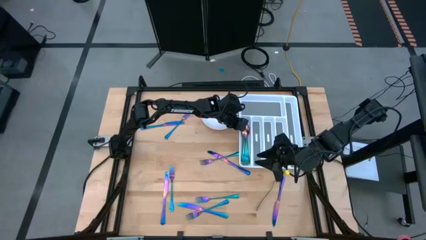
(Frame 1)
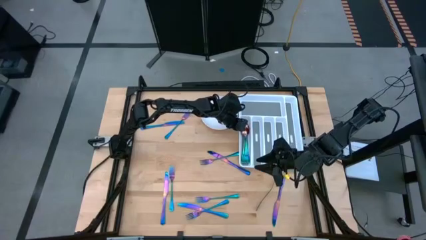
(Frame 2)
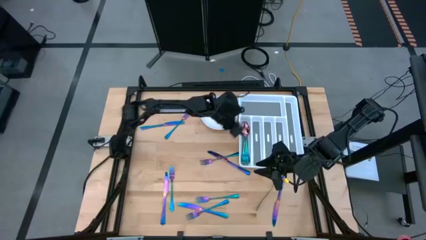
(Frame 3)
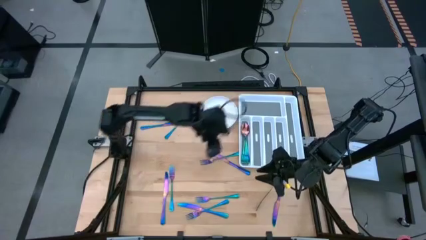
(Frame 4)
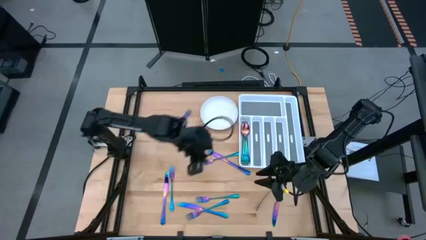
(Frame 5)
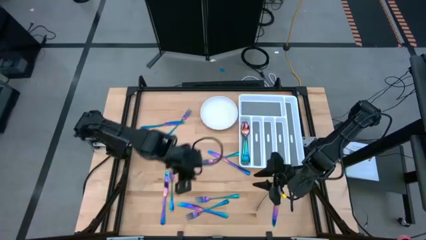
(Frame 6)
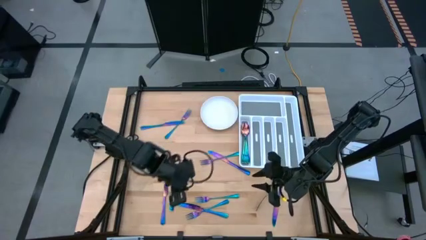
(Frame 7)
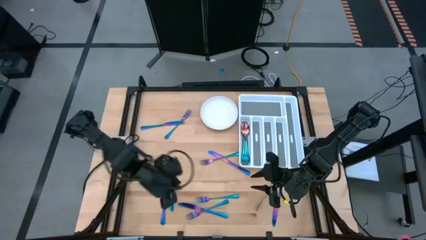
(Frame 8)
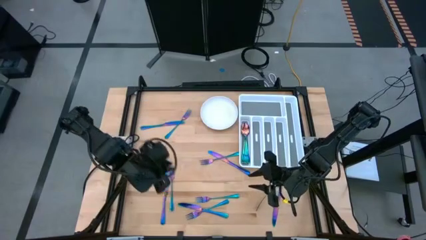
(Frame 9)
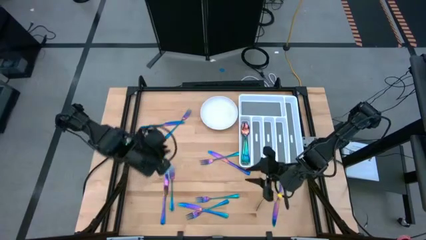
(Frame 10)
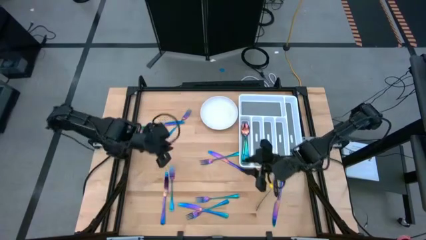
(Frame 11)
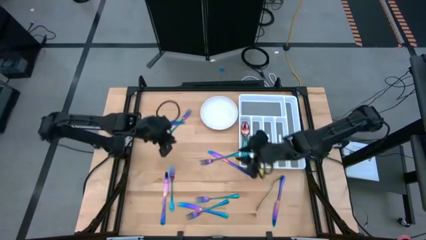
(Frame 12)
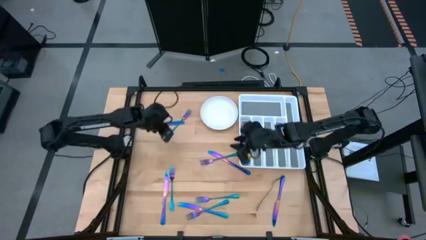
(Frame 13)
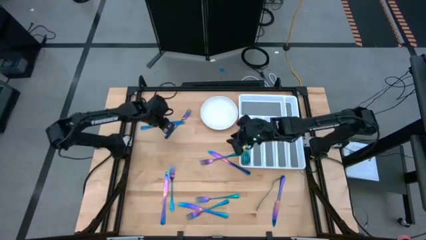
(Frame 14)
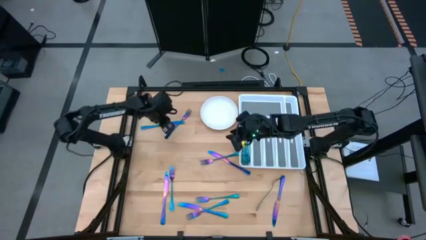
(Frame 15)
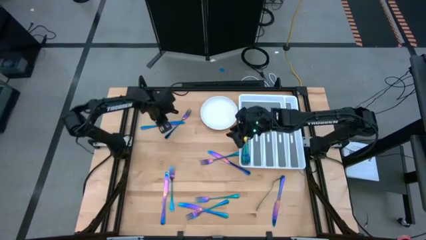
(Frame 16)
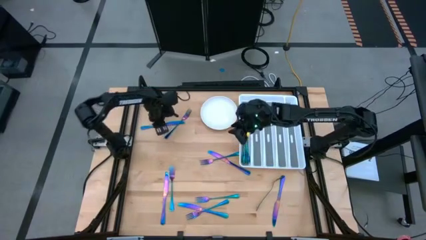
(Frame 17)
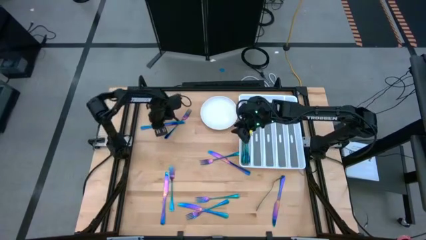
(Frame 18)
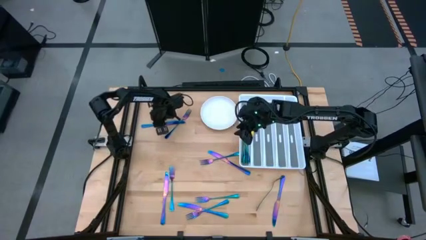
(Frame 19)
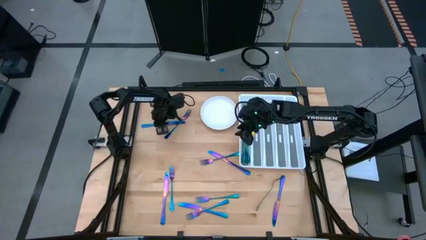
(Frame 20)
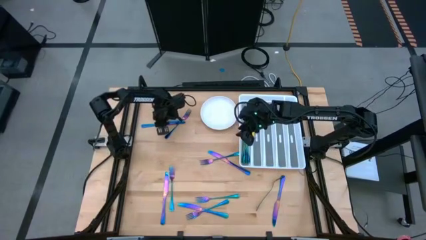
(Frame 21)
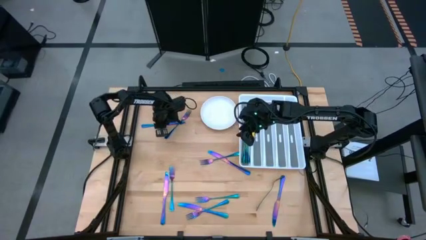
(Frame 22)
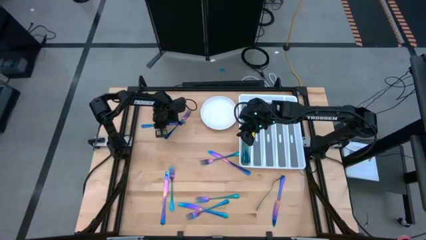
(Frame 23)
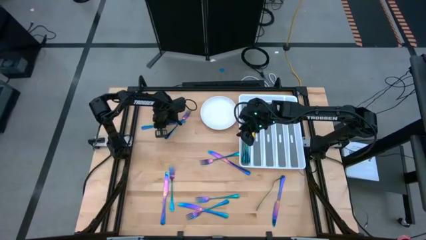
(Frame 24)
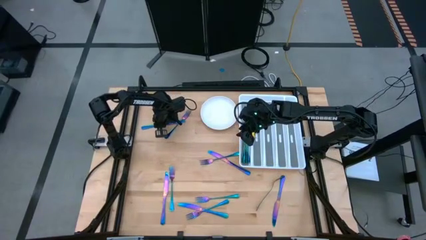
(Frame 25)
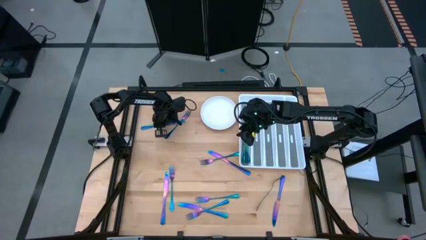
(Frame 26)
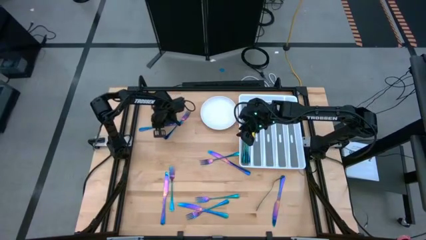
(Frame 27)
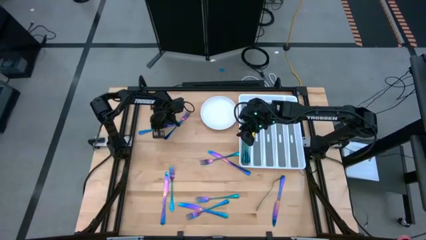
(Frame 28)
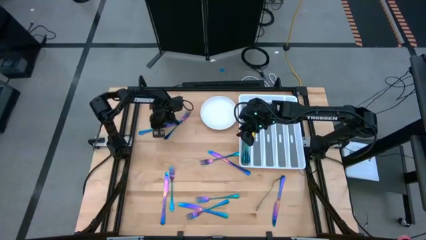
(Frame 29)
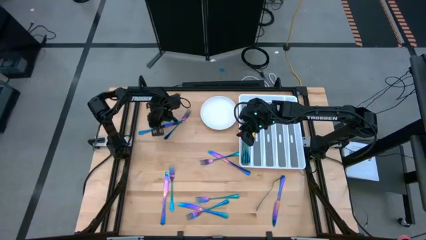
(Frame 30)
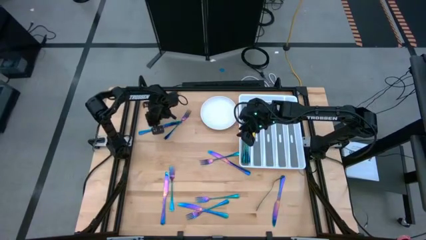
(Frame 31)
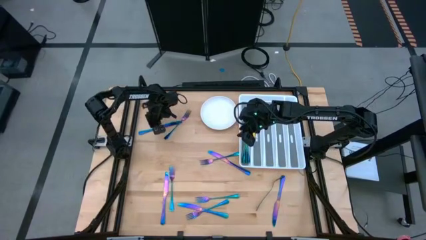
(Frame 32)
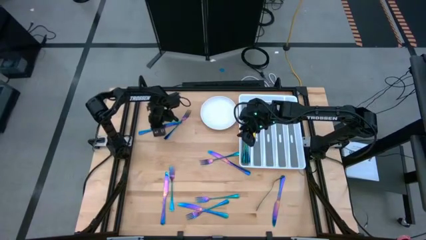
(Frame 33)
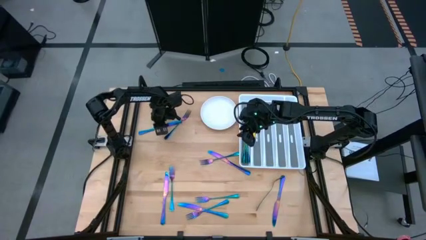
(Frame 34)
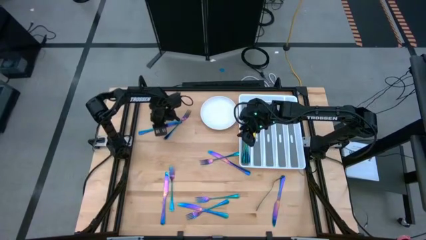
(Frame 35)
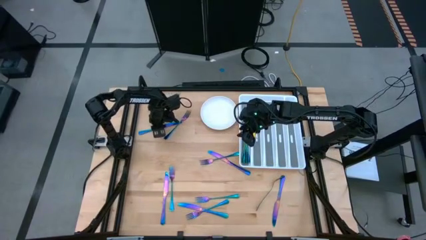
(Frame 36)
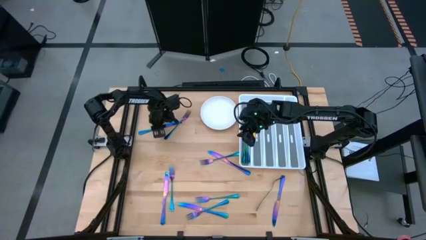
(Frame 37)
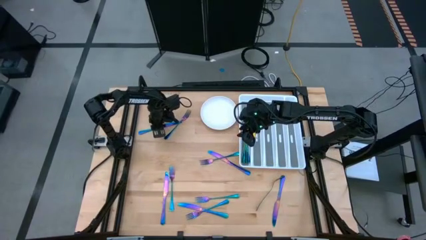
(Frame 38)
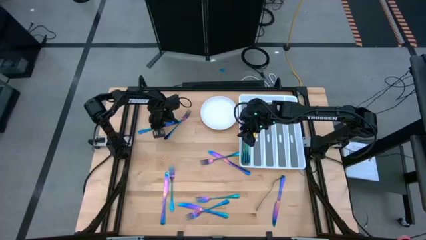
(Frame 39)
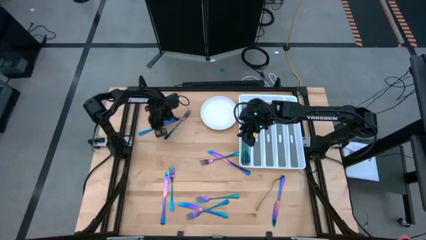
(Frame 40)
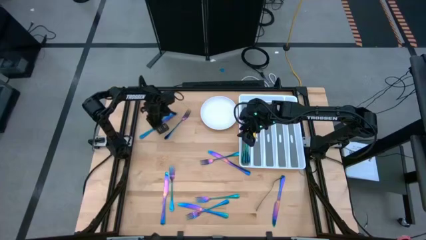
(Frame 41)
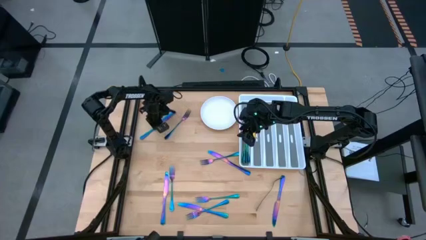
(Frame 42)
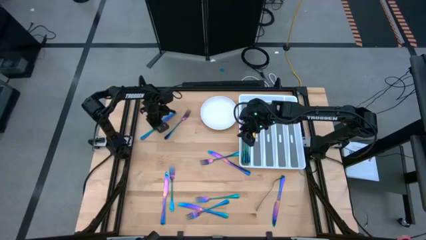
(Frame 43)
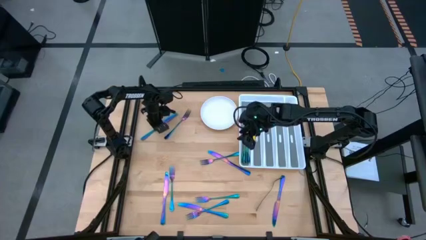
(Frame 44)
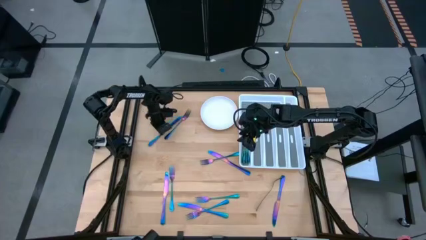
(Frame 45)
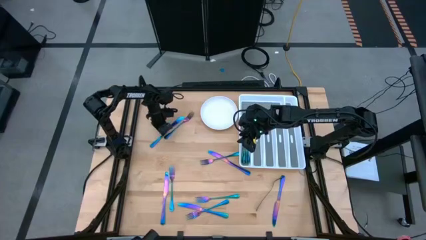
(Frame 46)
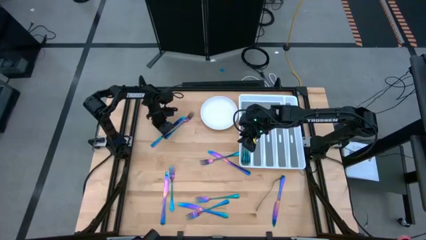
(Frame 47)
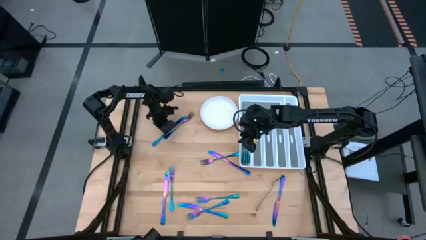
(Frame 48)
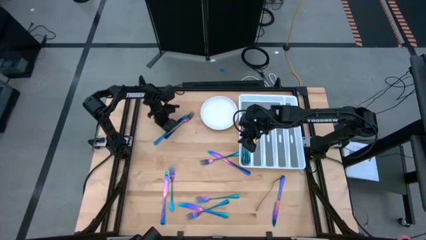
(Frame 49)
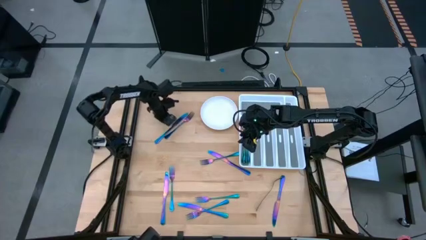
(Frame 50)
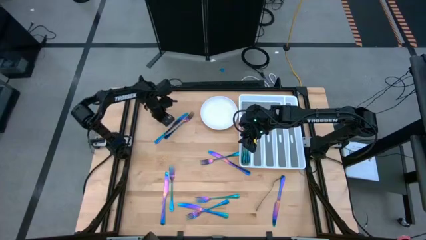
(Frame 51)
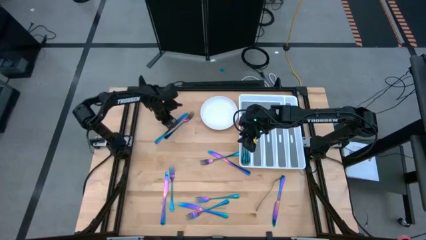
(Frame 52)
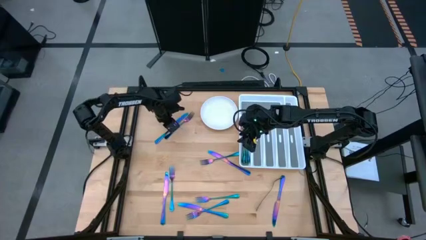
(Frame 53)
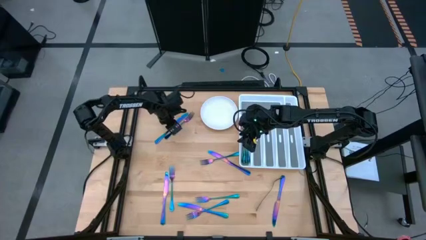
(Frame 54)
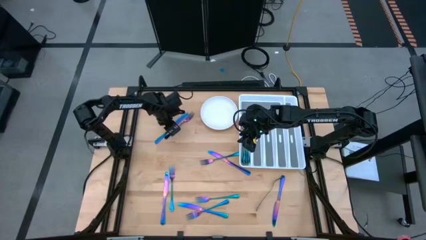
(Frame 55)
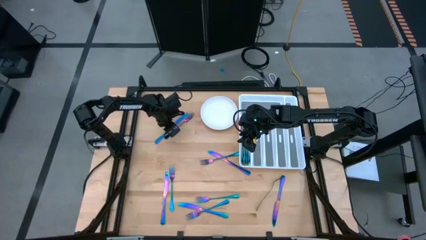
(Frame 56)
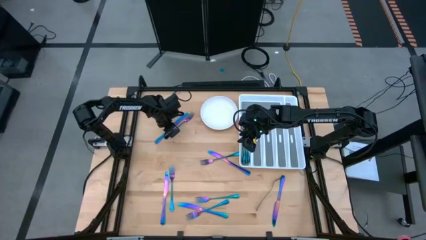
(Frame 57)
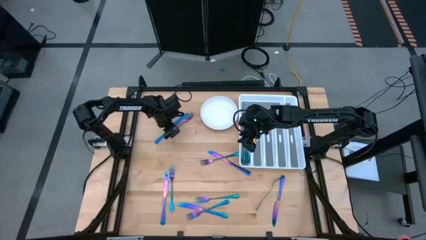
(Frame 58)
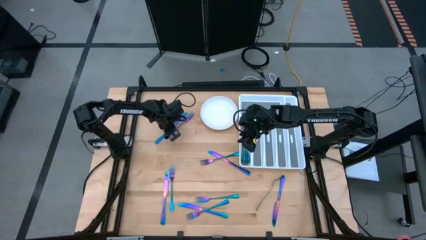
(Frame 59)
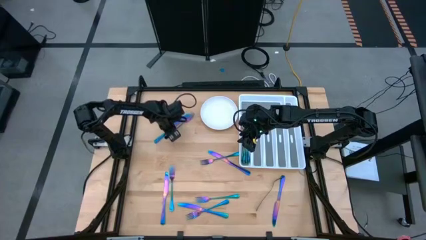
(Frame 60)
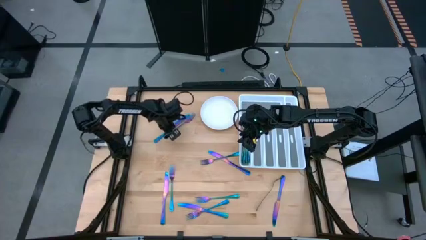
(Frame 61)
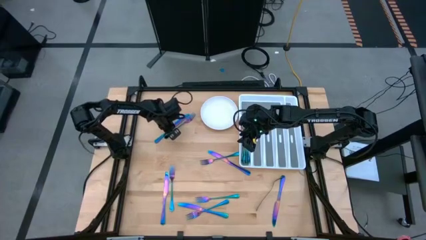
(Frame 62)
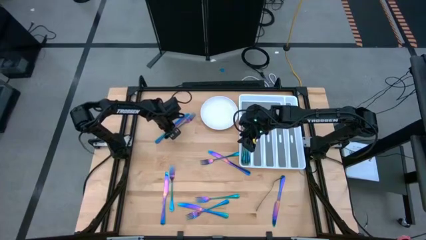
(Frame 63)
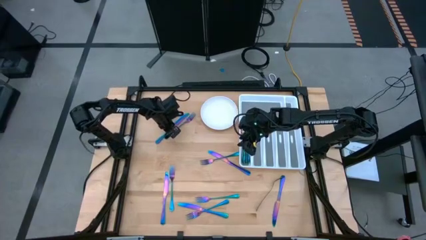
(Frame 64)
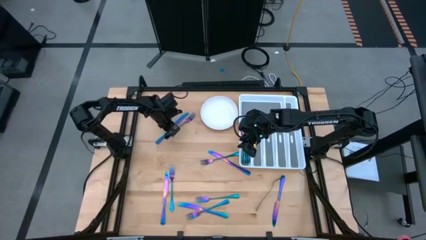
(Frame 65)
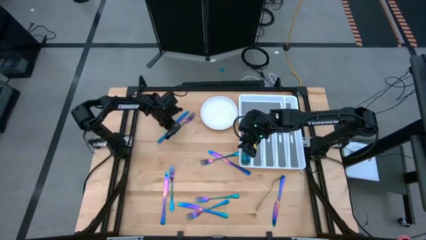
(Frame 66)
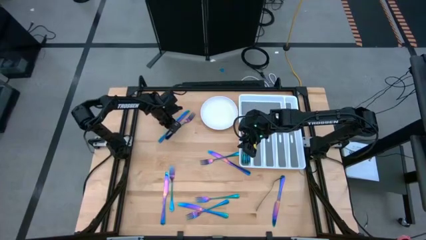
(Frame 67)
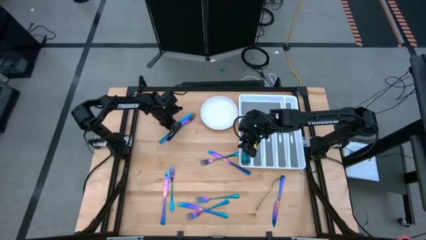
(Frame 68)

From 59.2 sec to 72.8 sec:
Task: Sort silverware
Put the purple table knife on the white silverware tray

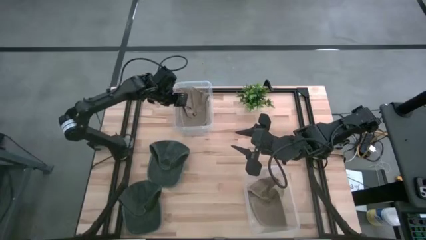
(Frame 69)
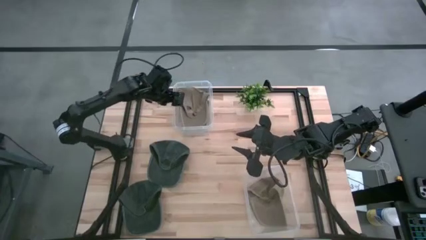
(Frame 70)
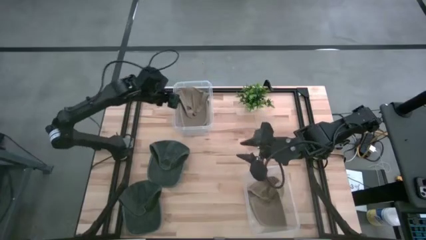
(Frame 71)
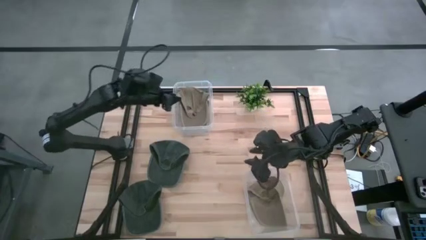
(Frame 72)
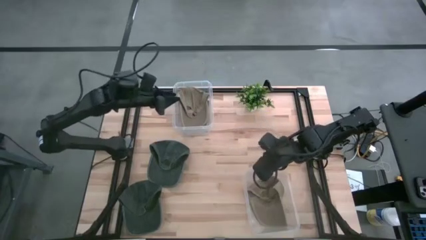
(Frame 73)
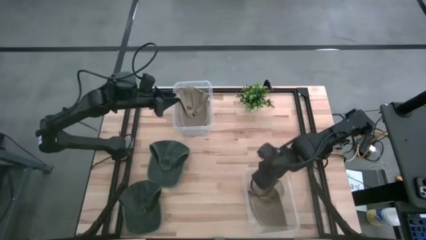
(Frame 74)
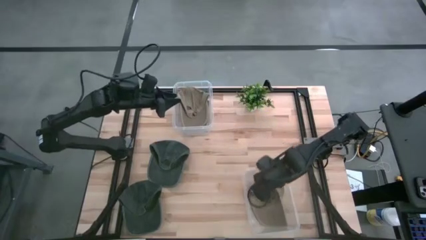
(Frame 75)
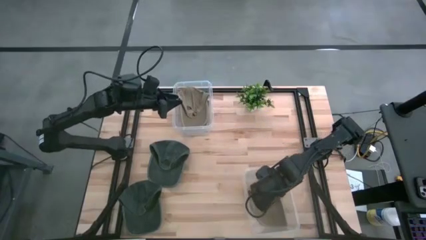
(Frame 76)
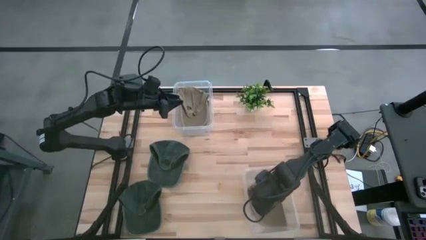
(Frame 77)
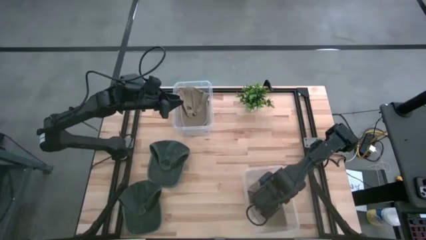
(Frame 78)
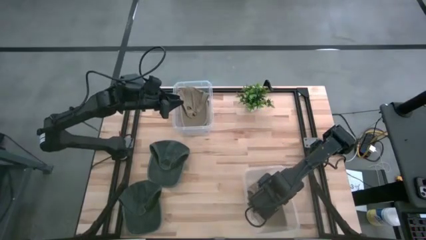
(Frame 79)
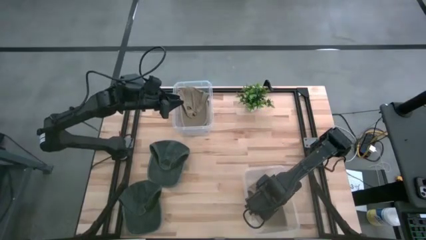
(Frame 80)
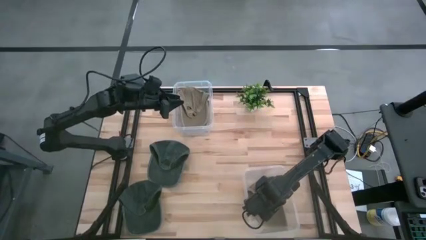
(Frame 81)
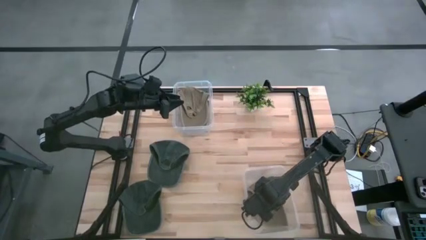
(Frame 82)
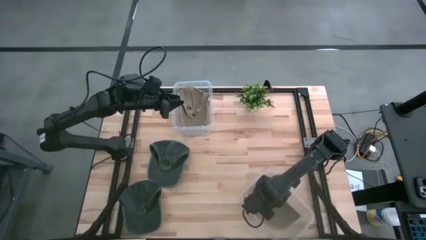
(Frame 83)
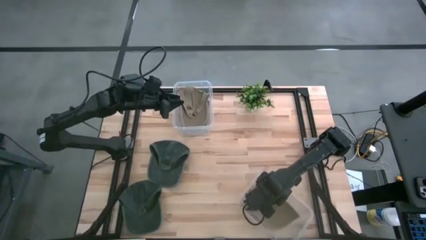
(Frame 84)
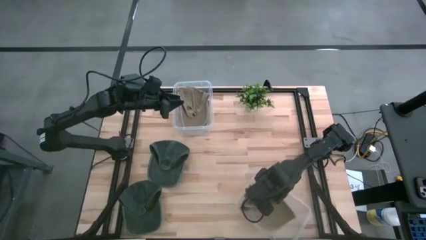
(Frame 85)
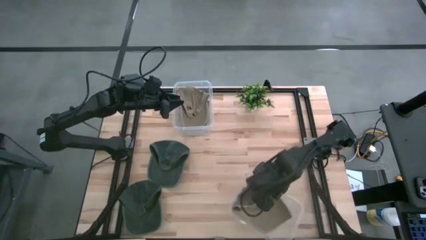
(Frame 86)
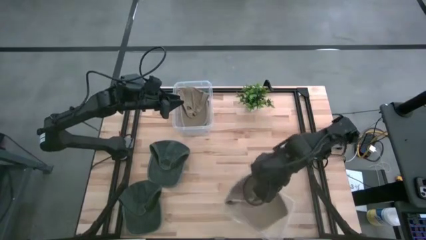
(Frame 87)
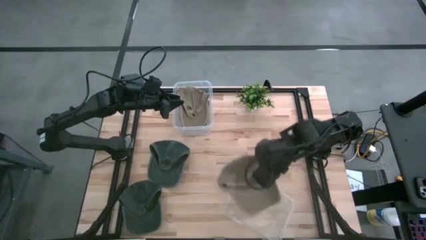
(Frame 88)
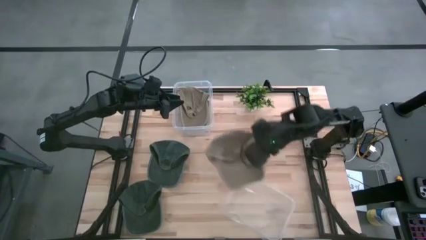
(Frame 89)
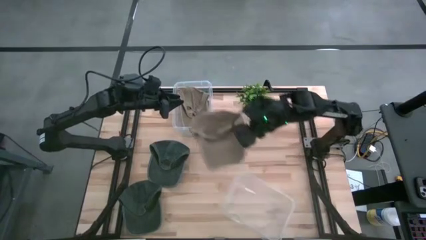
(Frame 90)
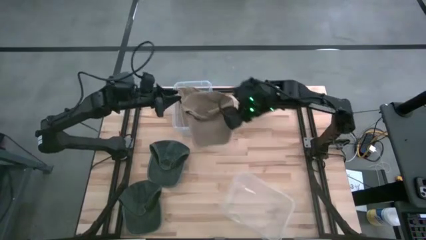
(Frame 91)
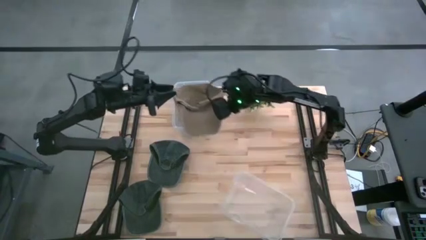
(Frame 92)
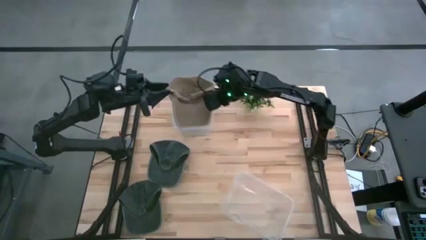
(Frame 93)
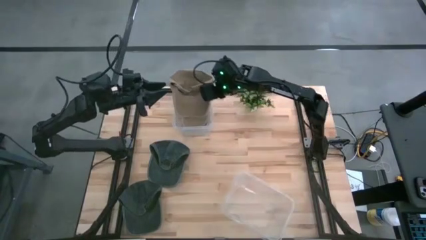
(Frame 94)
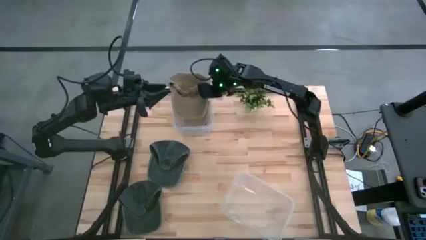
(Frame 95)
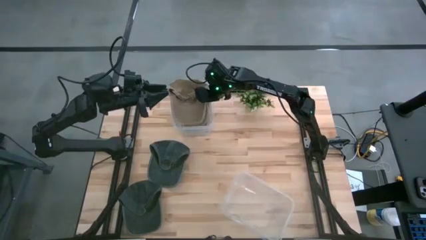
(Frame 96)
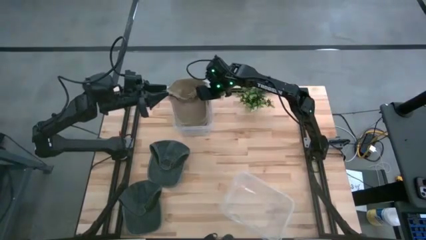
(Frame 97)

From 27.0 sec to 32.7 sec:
Task: Pick & Place hat
Put the brown cap into the top transparent bin
